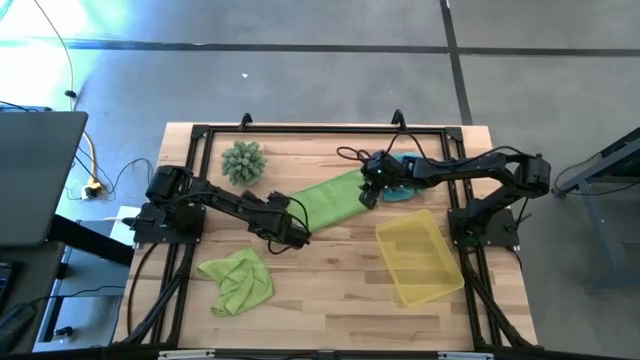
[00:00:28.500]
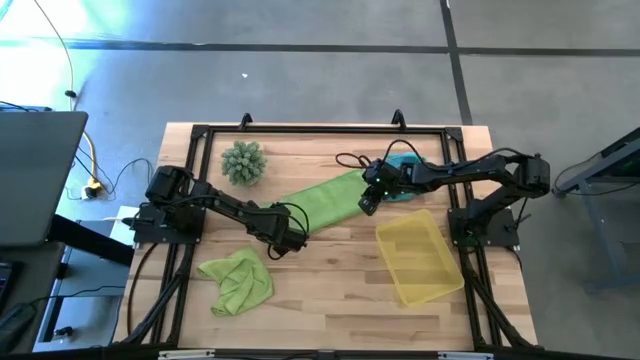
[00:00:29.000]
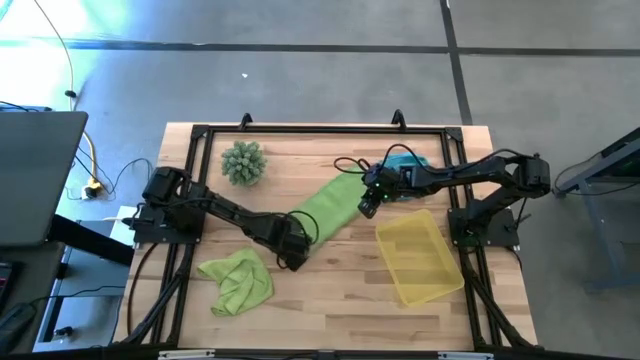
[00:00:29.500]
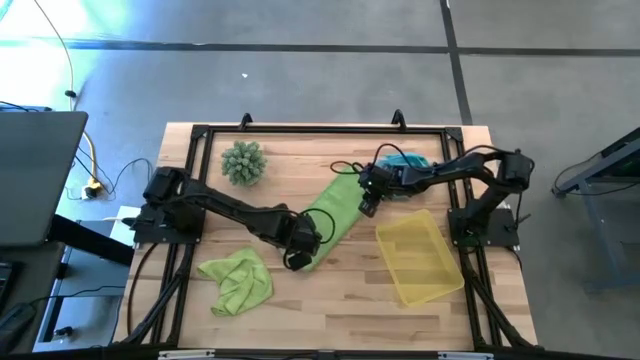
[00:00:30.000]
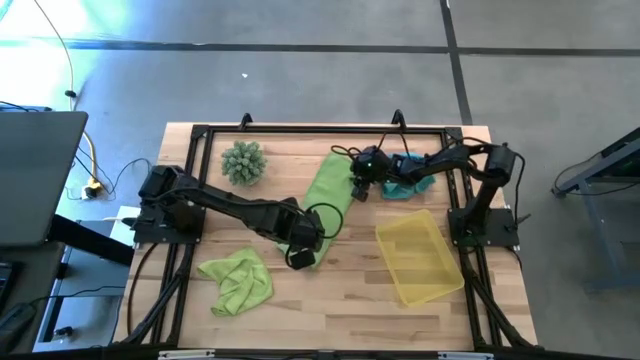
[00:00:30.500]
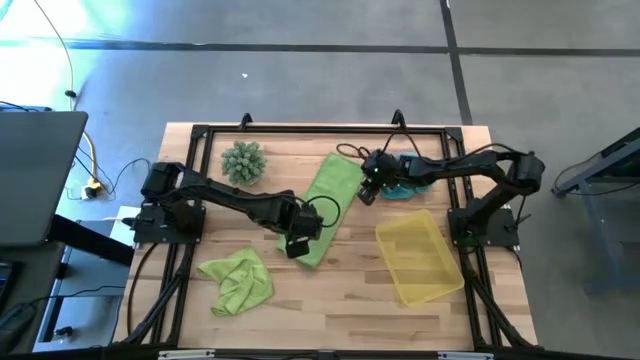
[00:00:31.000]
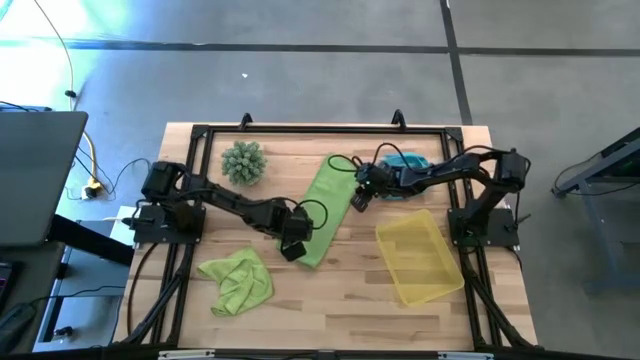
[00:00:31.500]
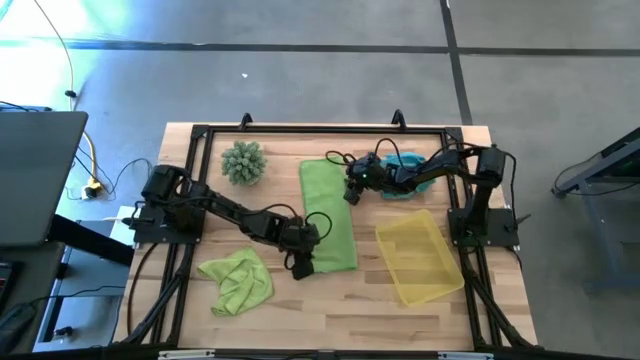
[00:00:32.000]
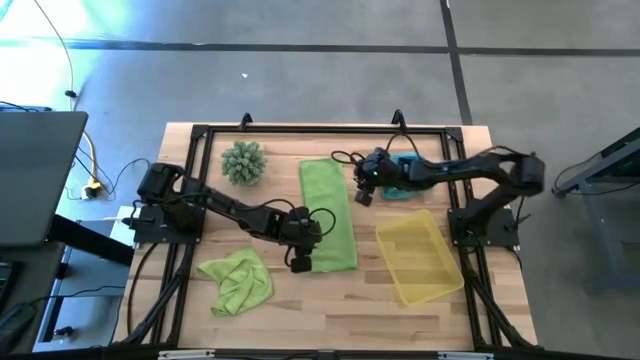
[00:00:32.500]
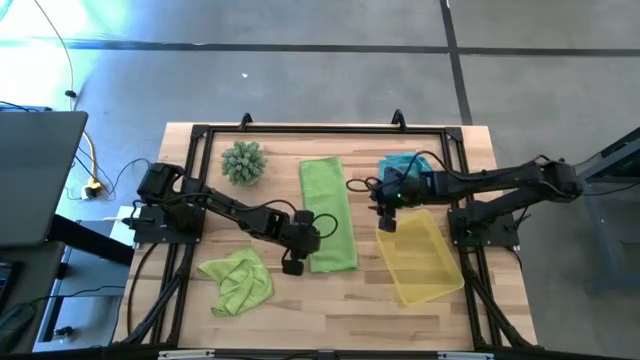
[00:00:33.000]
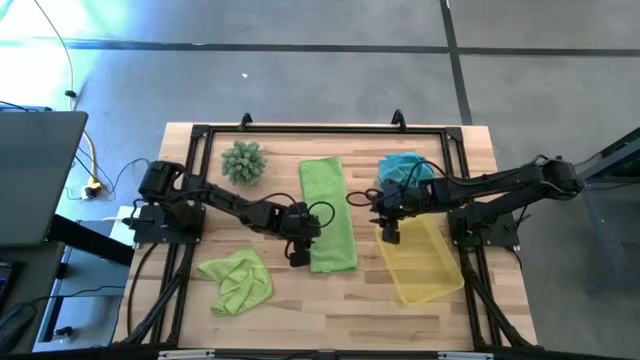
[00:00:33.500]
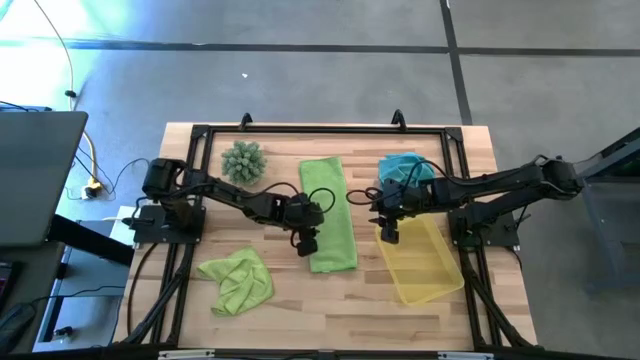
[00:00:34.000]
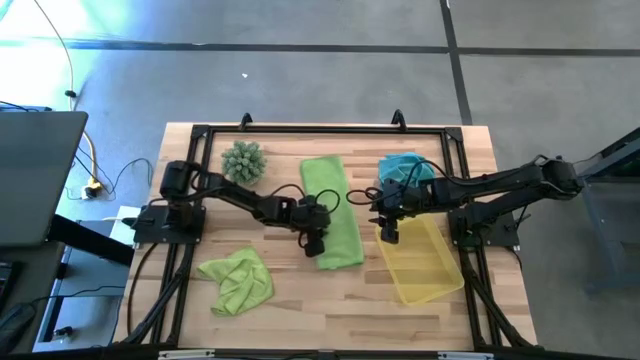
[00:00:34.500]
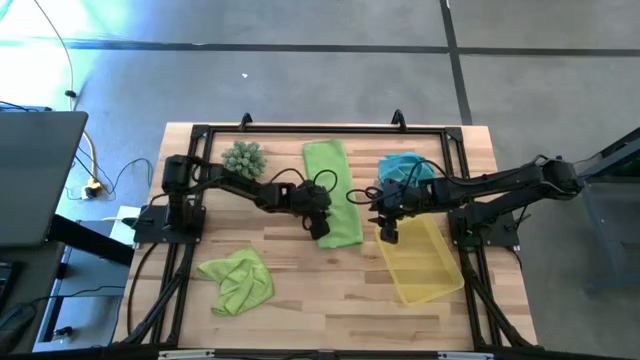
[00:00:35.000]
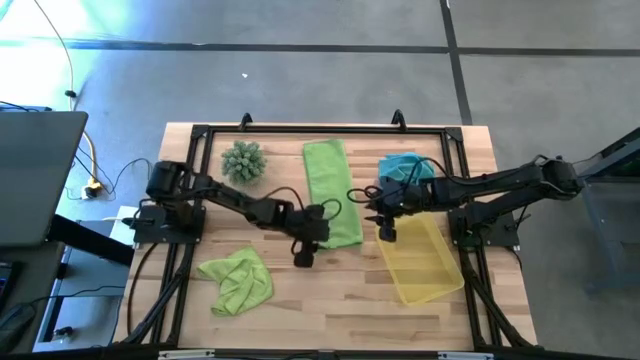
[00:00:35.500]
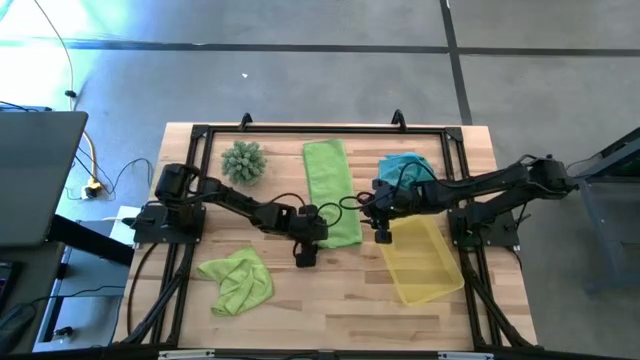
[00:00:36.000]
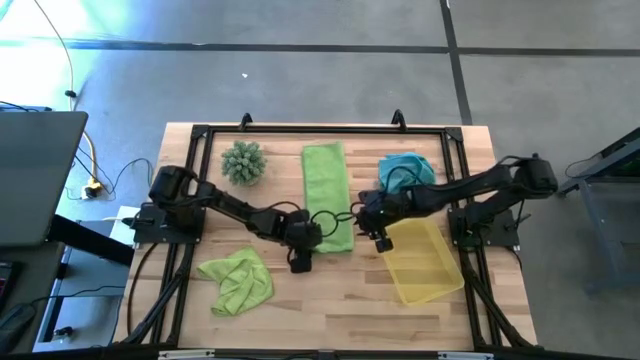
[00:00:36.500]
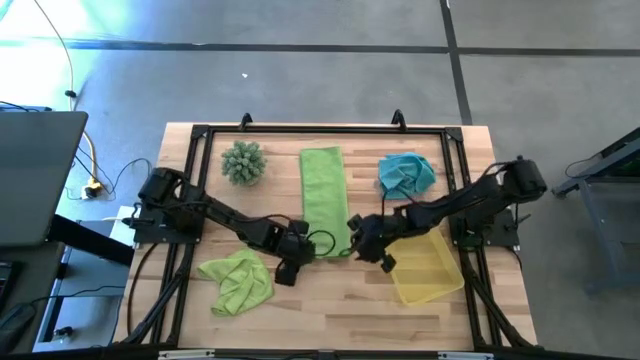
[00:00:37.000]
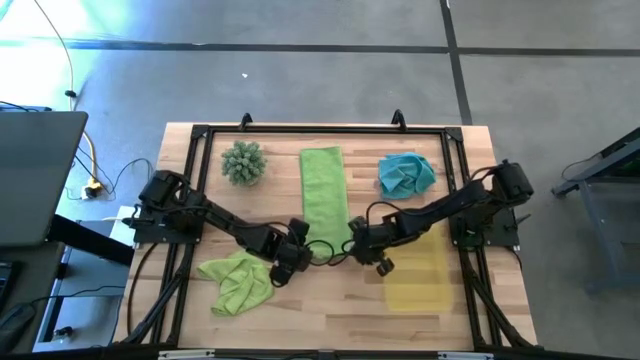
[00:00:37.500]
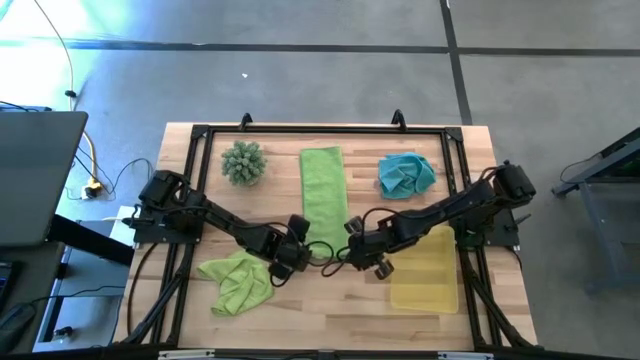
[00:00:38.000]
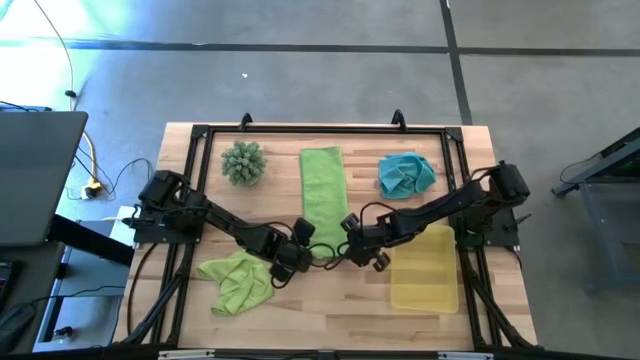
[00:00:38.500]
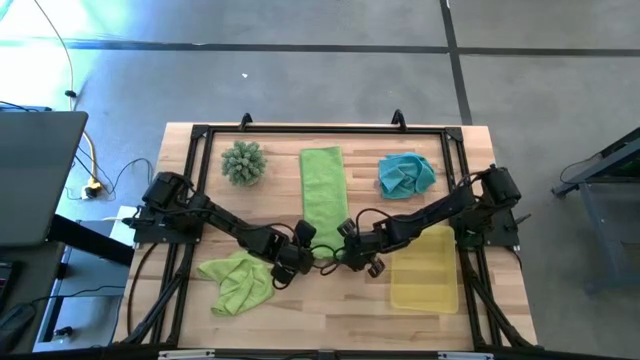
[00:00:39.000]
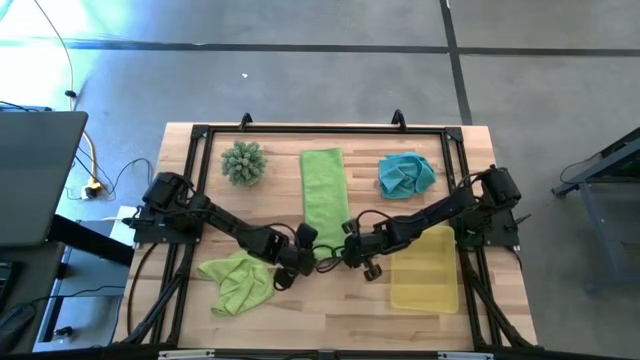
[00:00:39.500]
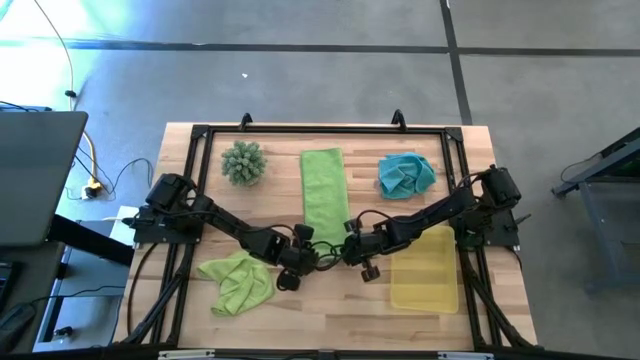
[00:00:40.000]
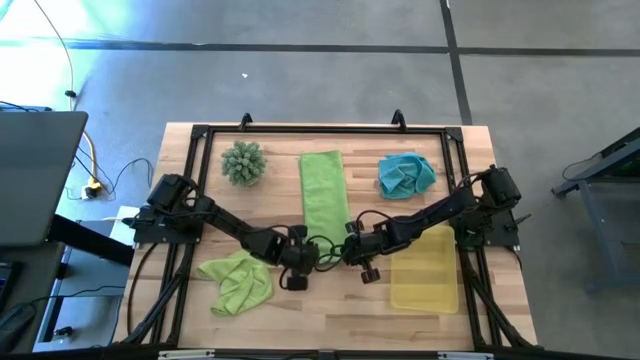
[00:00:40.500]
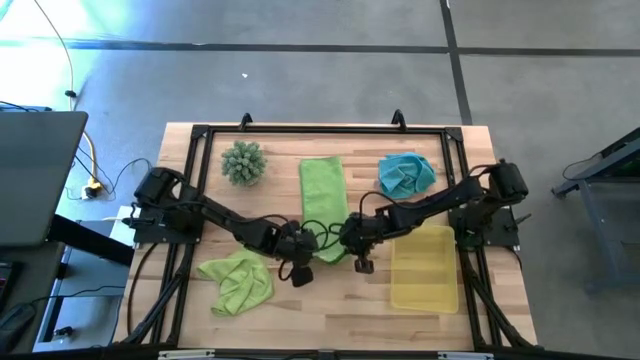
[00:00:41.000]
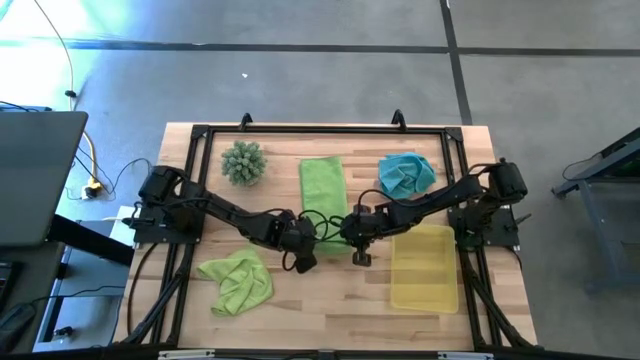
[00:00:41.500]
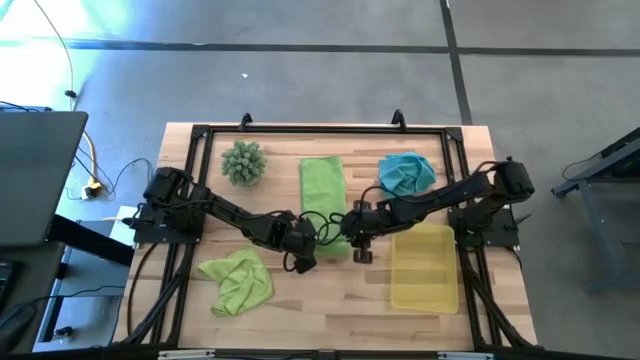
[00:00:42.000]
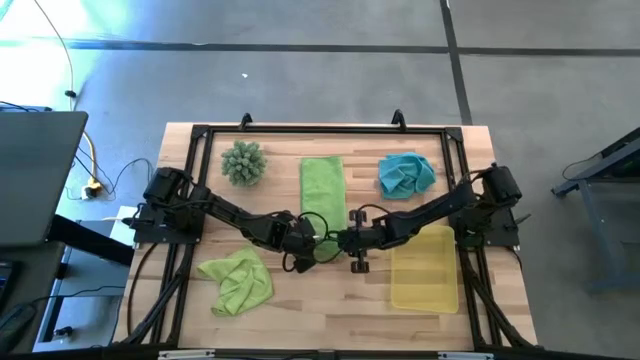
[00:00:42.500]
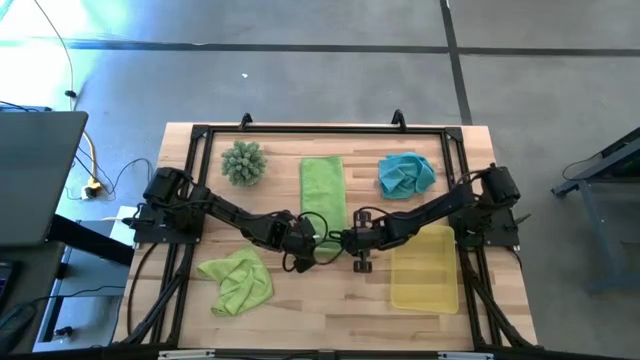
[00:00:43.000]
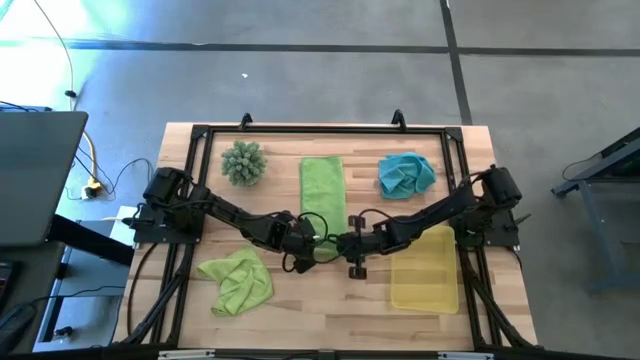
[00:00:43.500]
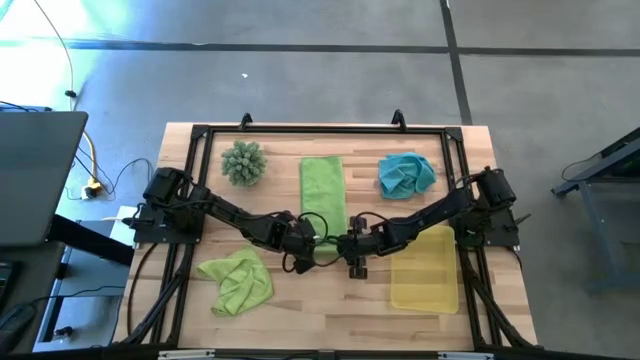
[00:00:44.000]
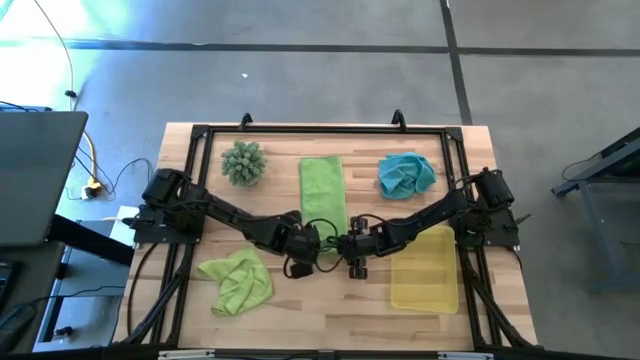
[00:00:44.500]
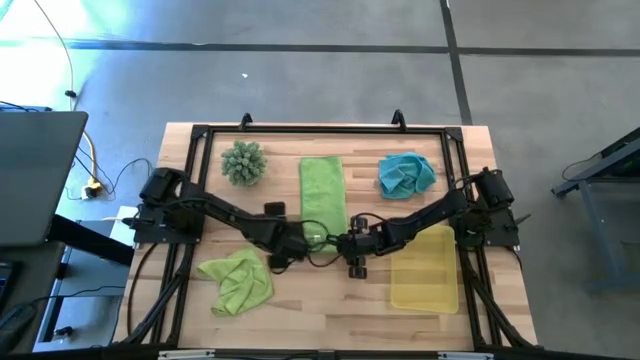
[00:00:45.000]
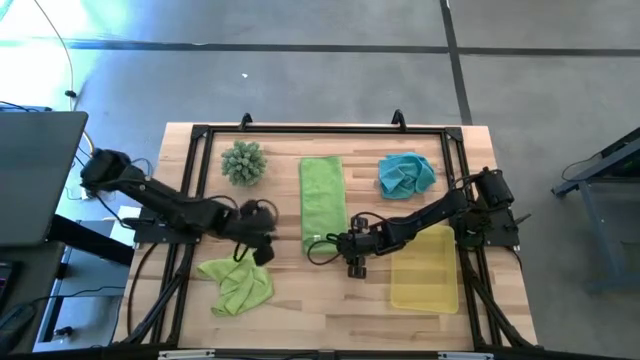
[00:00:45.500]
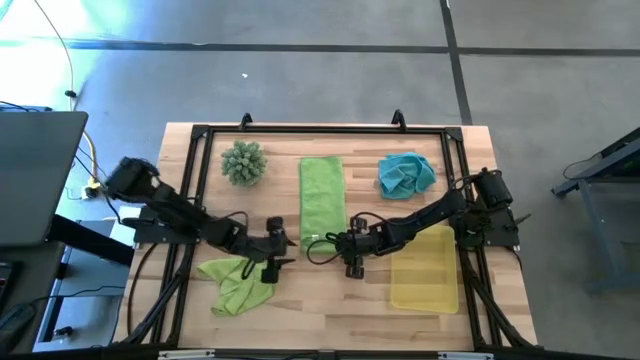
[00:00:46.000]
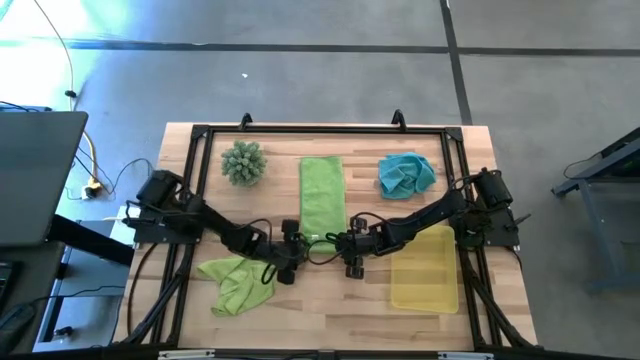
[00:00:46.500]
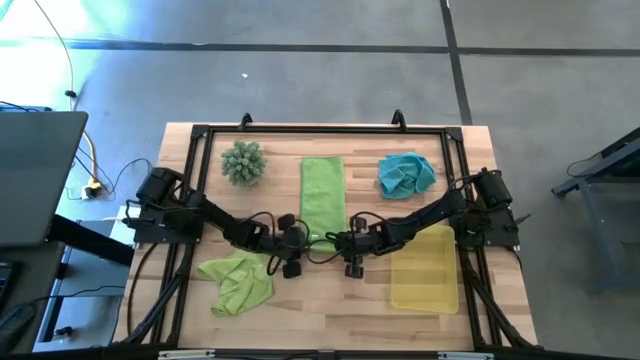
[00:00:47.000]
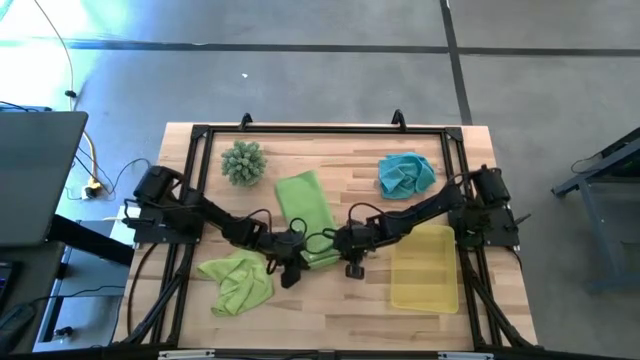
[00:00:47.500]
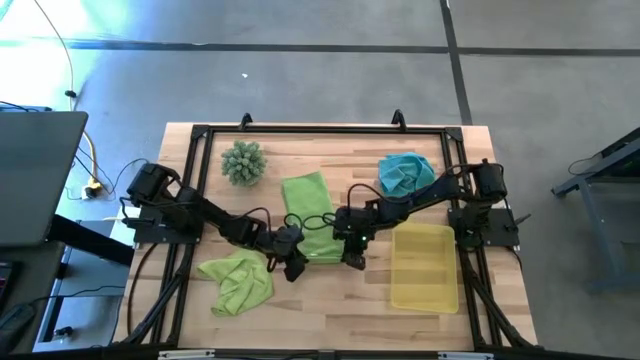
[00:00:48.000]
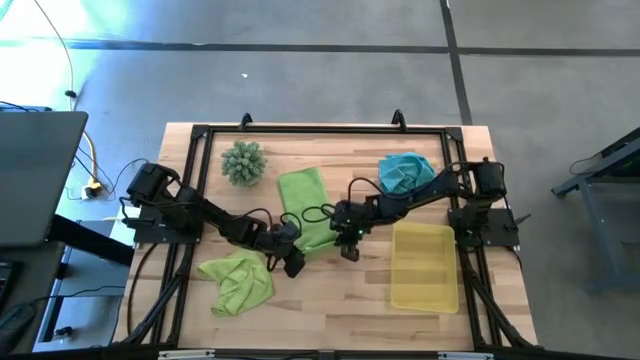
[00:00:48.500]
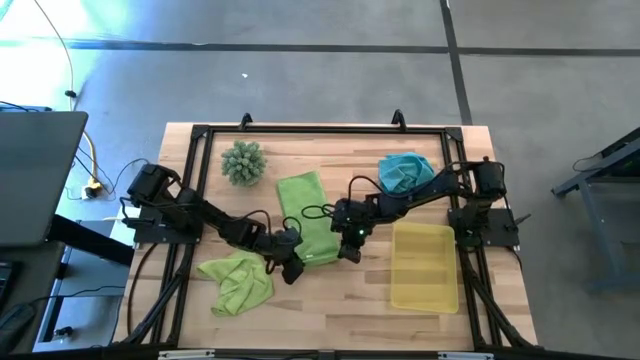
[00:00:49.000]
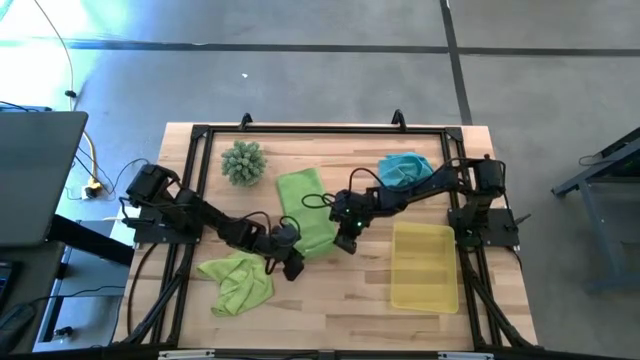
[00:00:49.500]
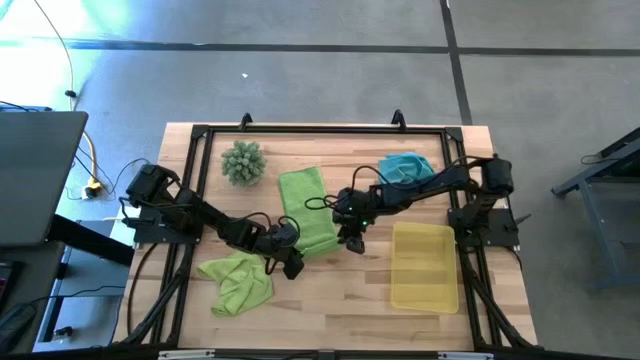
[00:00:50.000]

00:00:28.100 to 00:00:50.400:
Task: Roll microfiber towels into tight, uniform cylinder then place into a basket
Roll the green cloth
